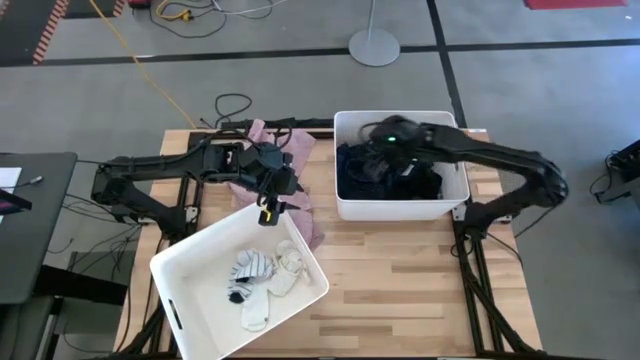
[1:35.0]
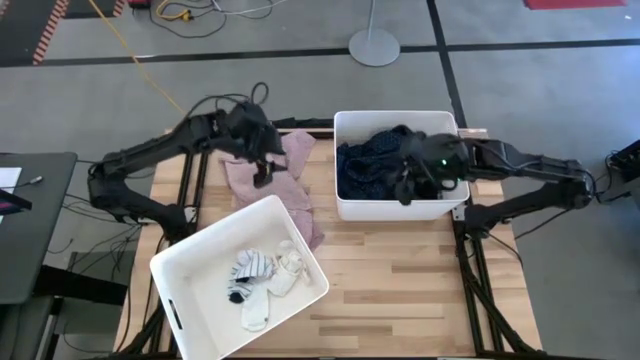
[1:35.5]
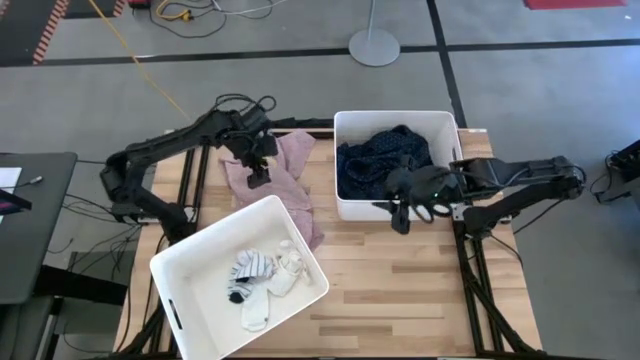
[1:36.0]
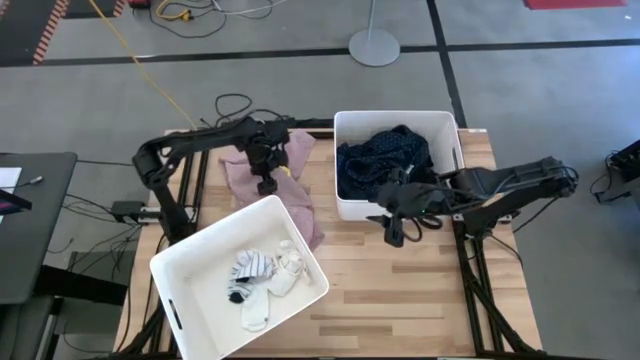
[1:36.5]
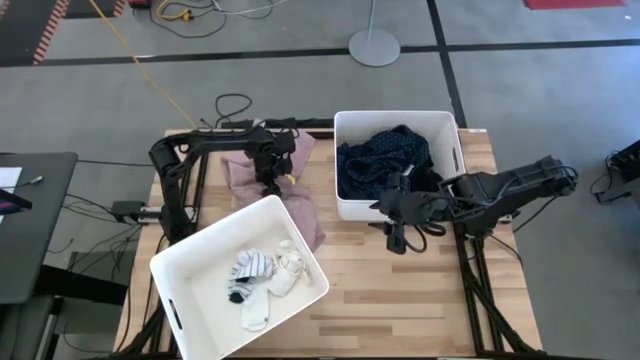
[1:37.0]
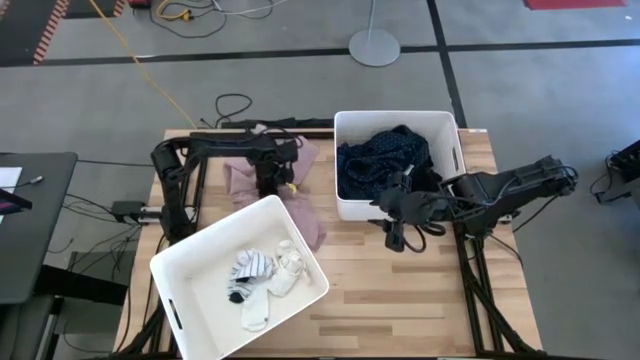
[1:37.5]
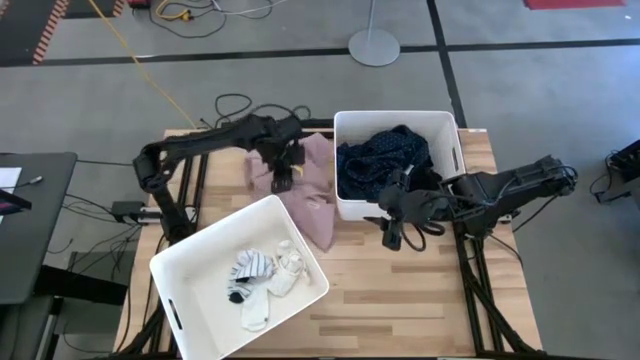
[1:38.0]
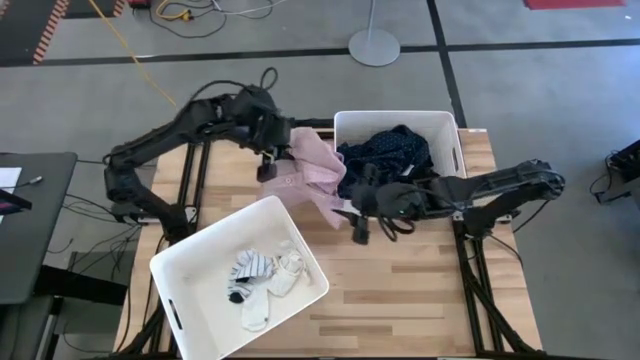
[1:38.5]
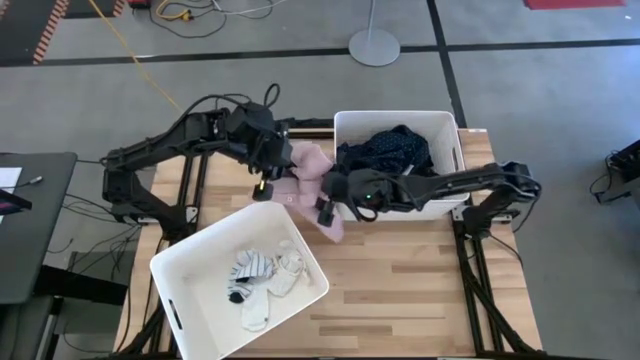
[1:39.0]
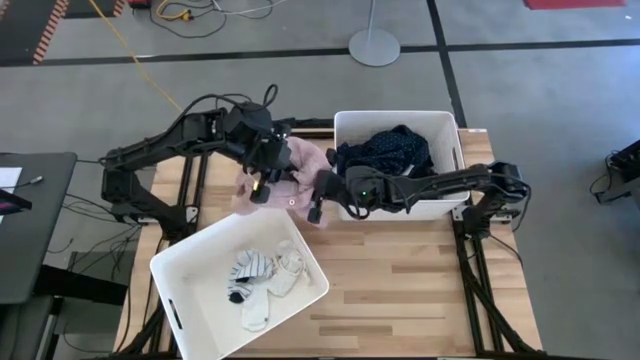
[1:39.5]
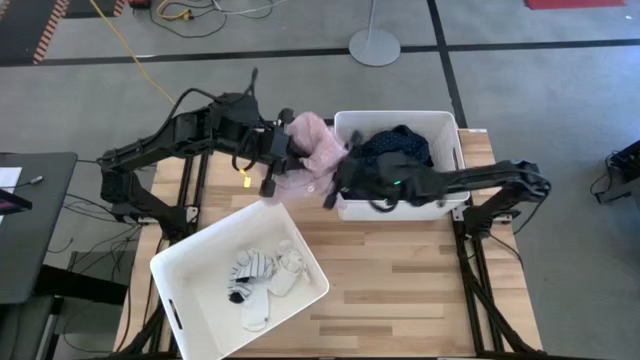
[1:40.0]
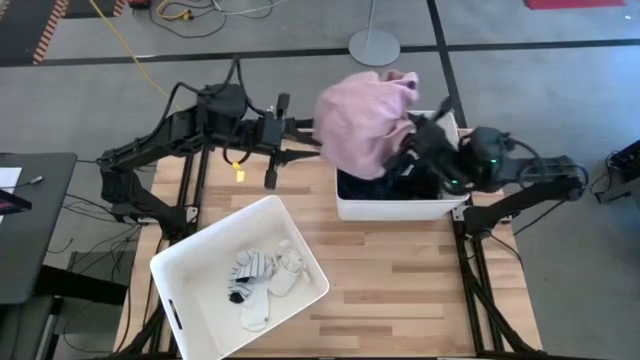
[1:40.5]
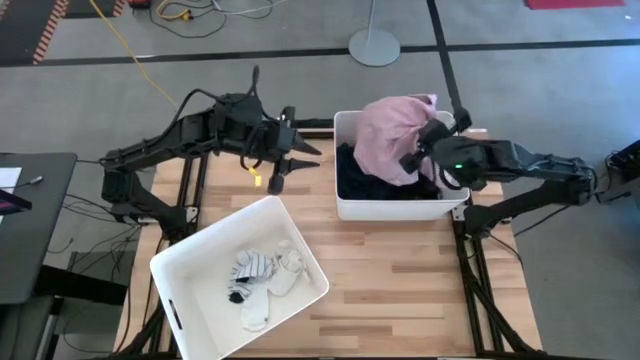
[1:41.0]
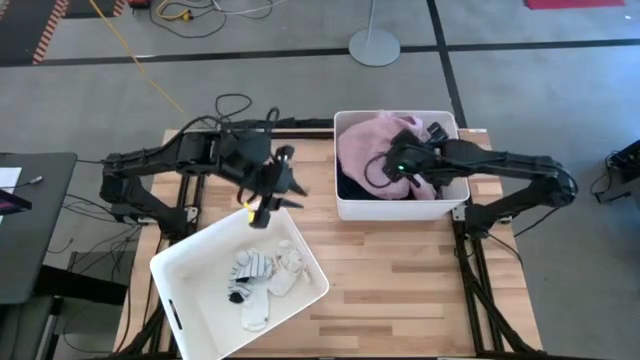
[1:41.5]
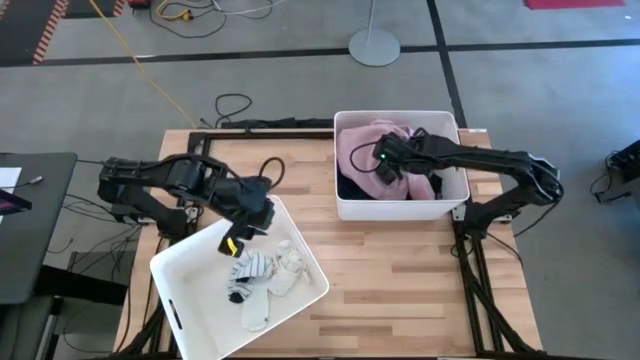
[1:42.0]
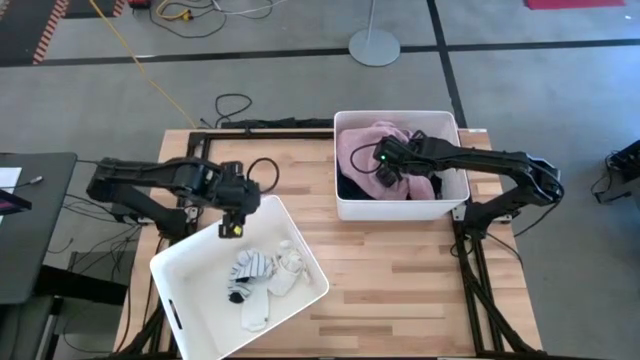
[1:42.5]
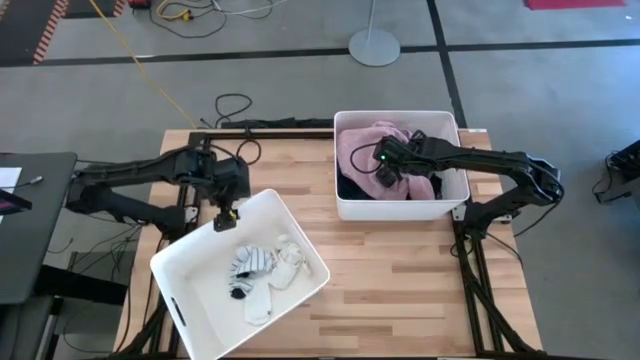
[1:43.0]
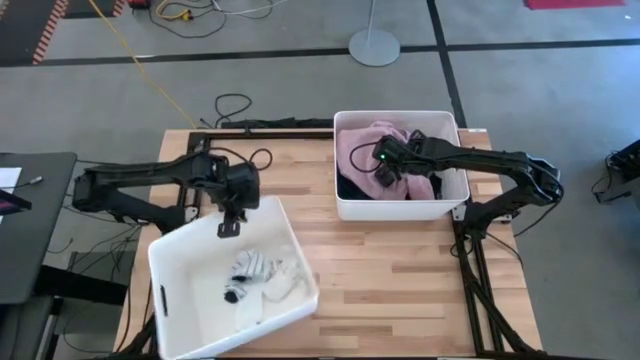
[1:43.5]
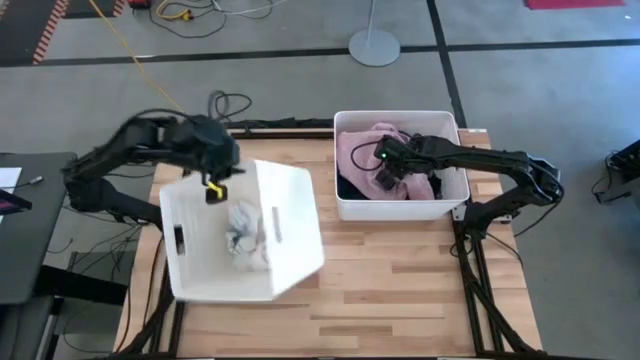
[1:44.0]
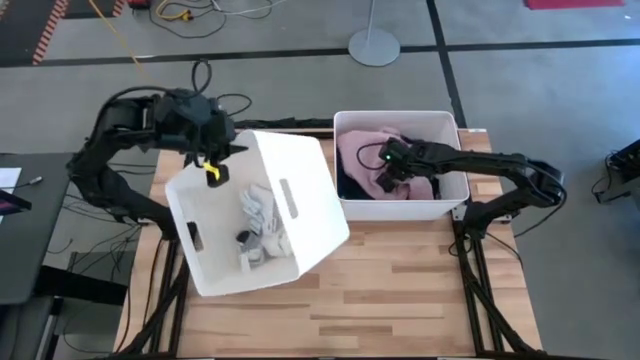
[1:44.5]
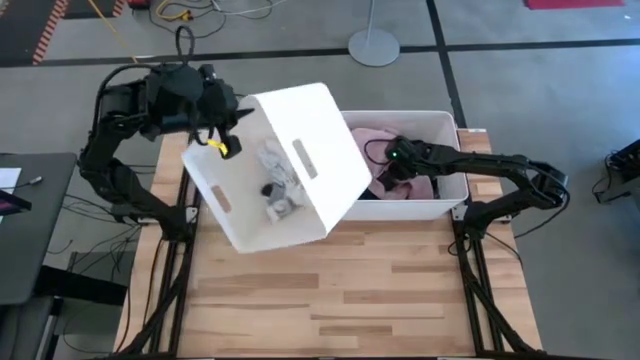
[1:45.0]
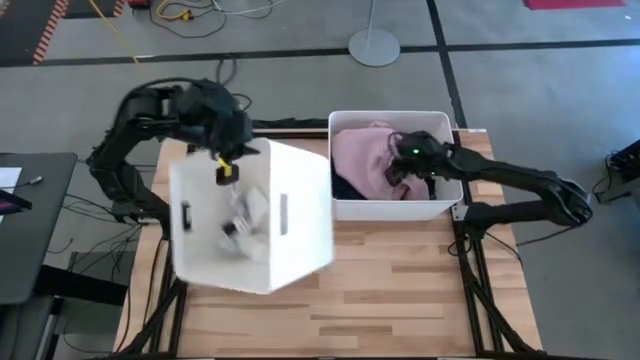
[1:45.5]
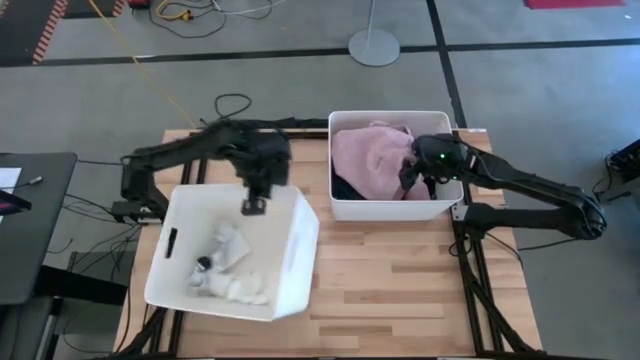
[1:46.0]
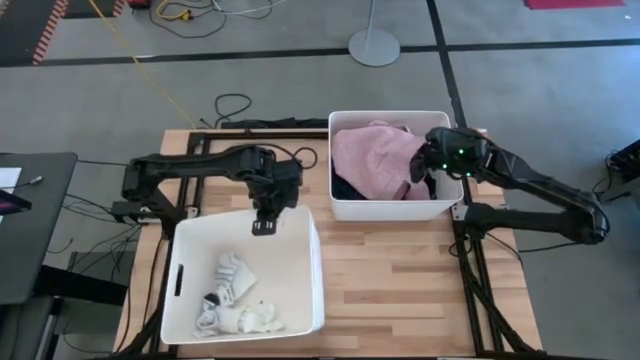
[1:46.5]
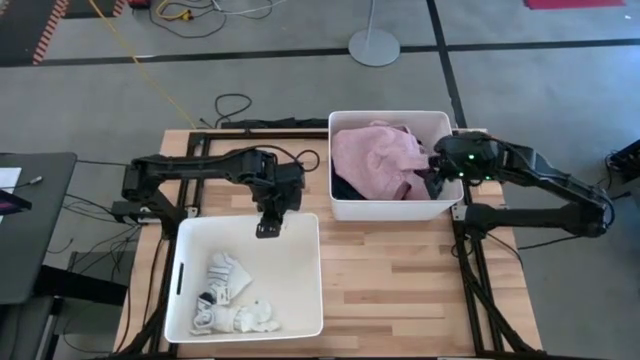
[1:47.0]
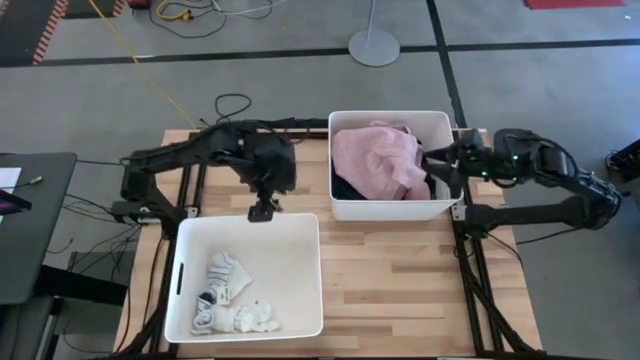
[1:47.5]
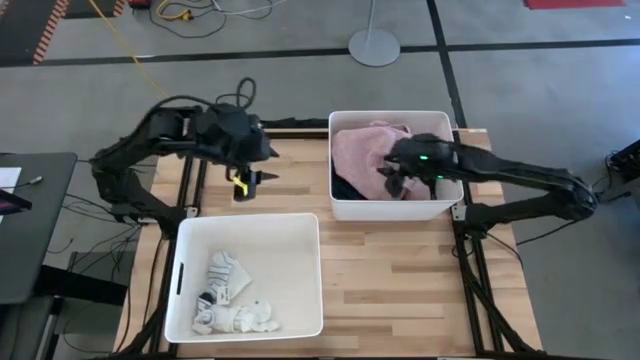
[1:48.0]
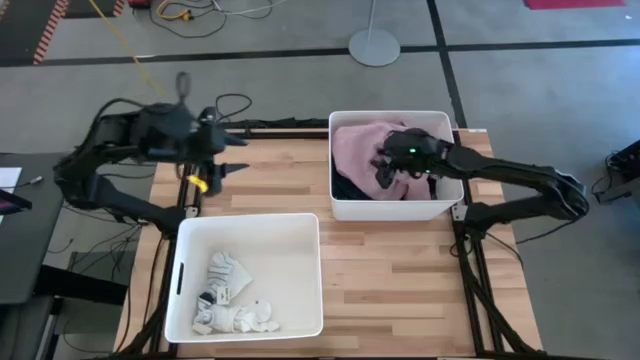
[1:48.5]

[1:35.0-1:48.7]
Task: Sort clothes
Put the pink long sleeve polo into the top laundry bin

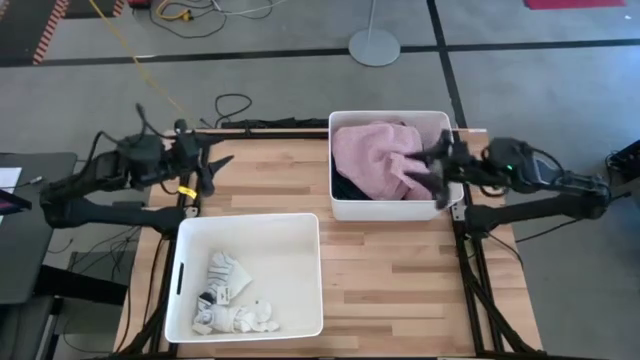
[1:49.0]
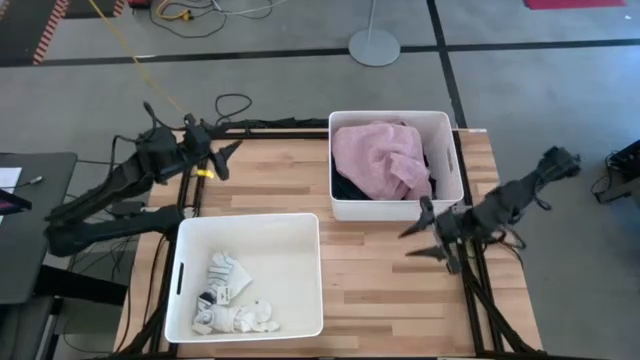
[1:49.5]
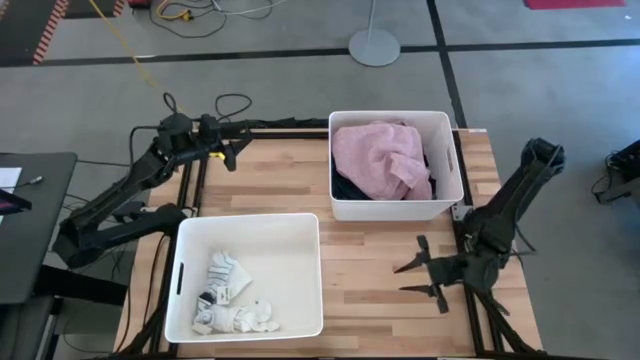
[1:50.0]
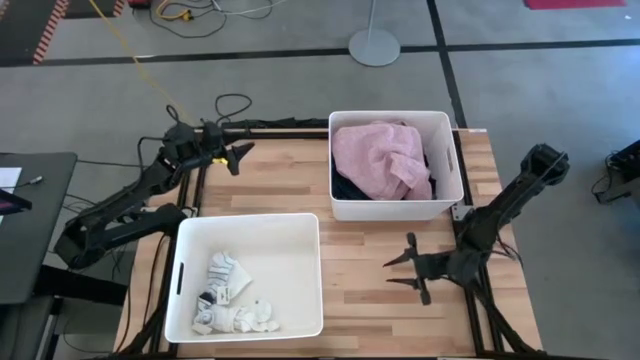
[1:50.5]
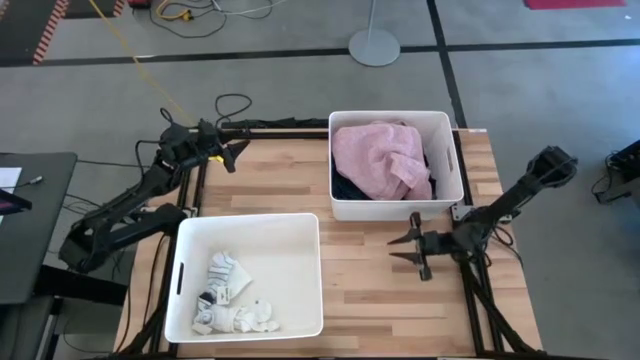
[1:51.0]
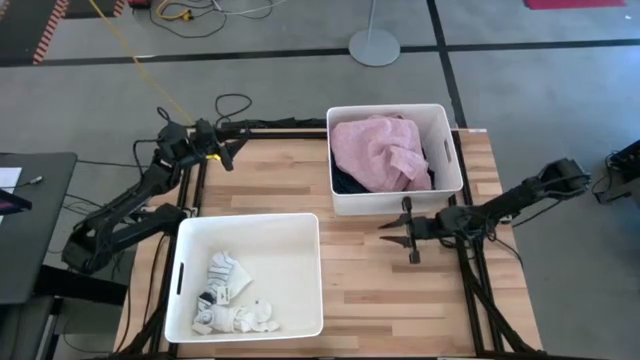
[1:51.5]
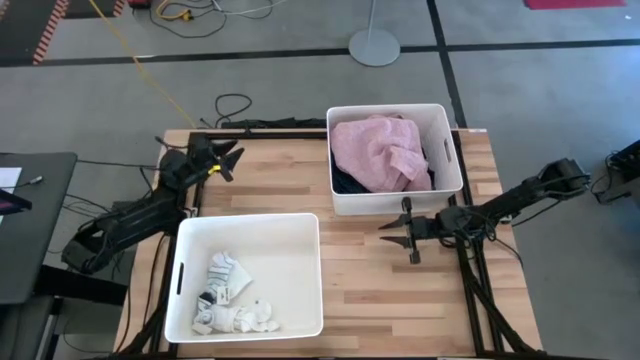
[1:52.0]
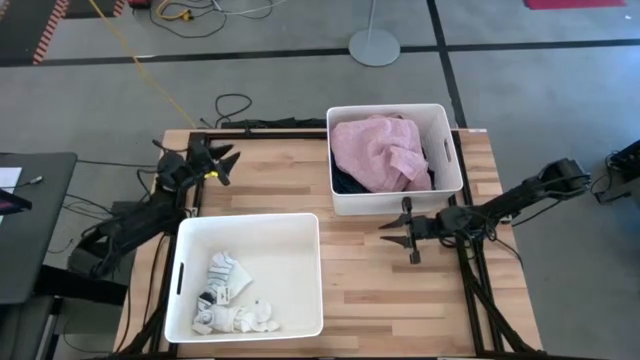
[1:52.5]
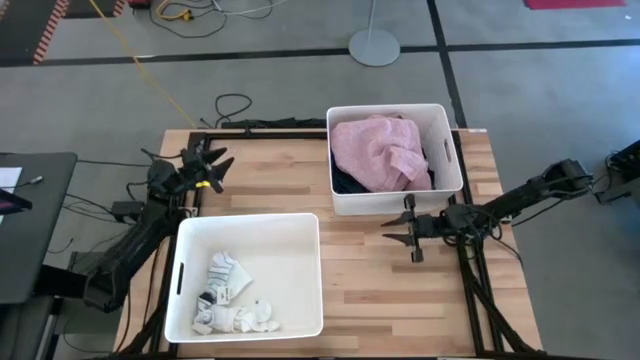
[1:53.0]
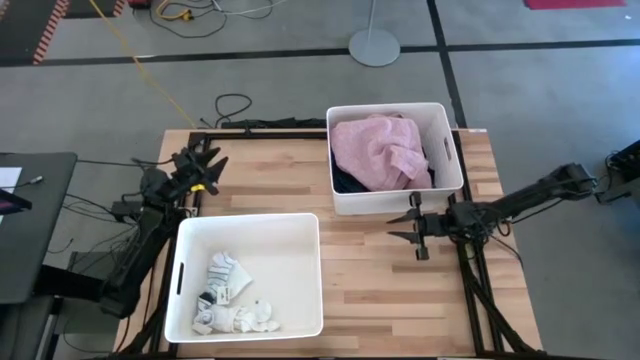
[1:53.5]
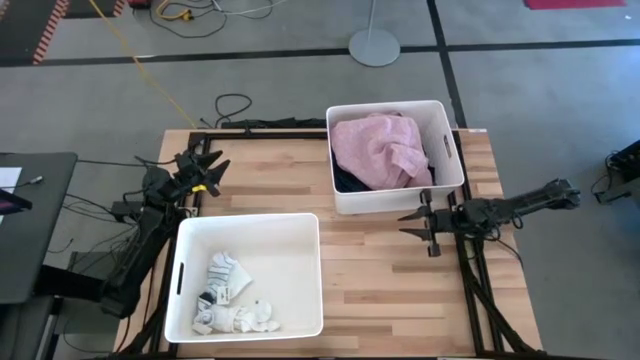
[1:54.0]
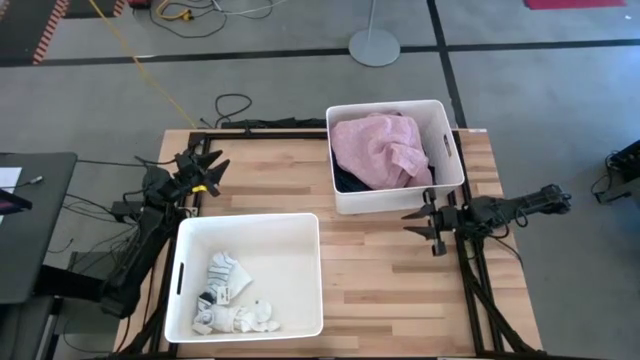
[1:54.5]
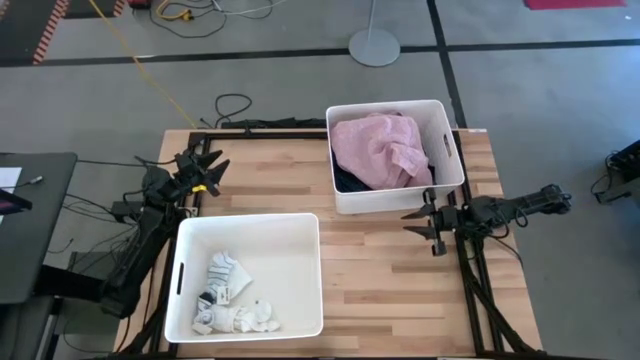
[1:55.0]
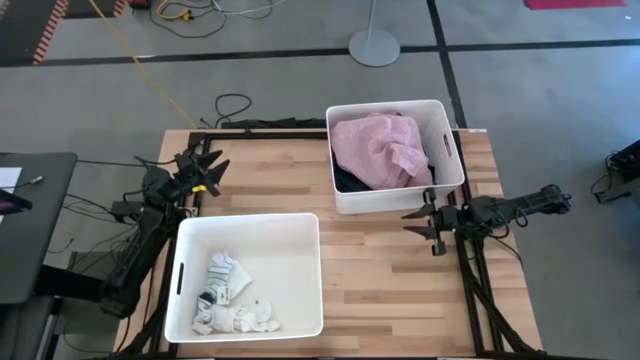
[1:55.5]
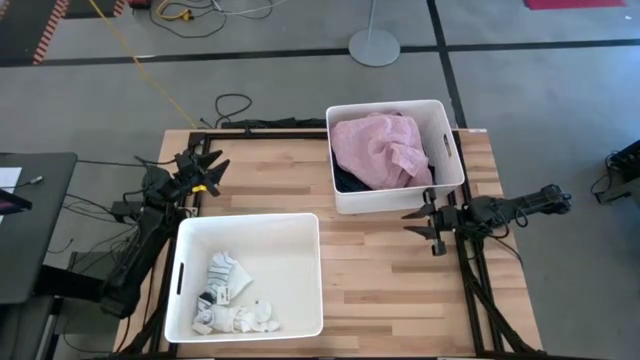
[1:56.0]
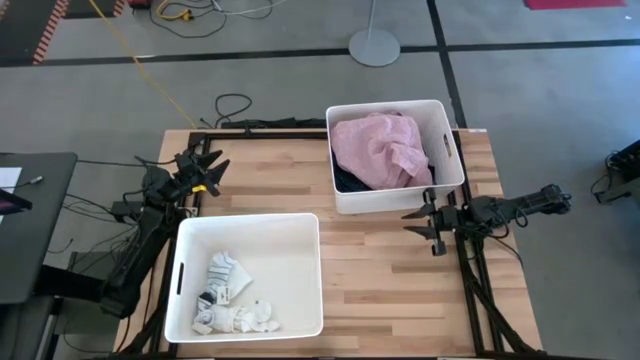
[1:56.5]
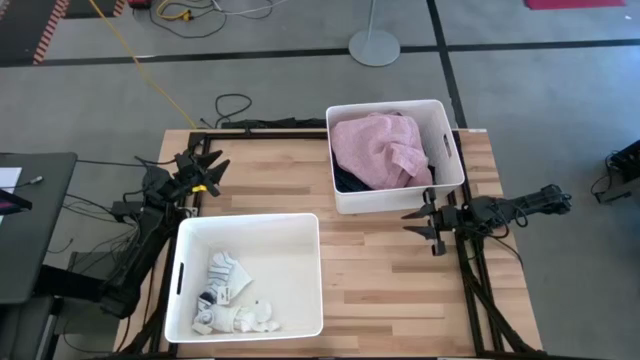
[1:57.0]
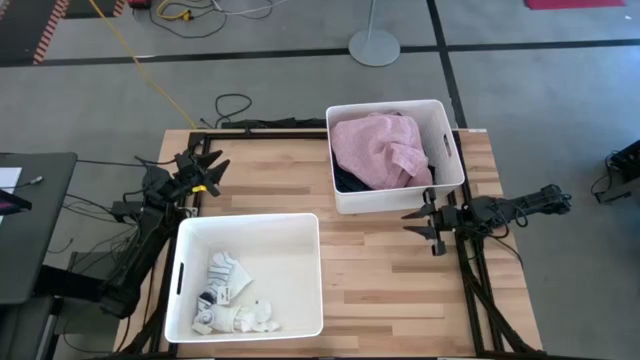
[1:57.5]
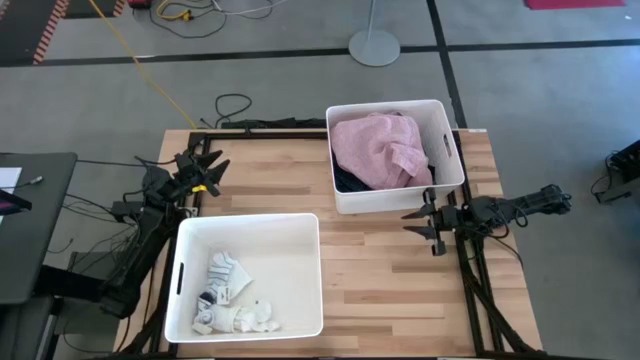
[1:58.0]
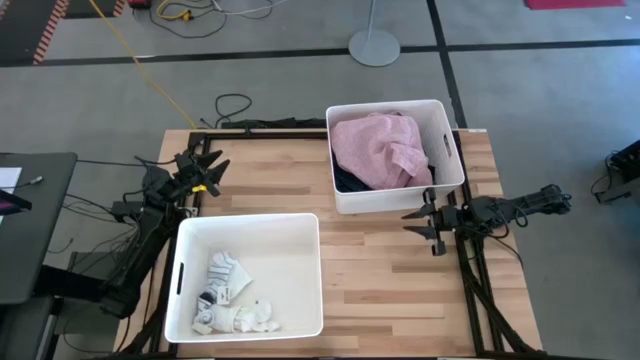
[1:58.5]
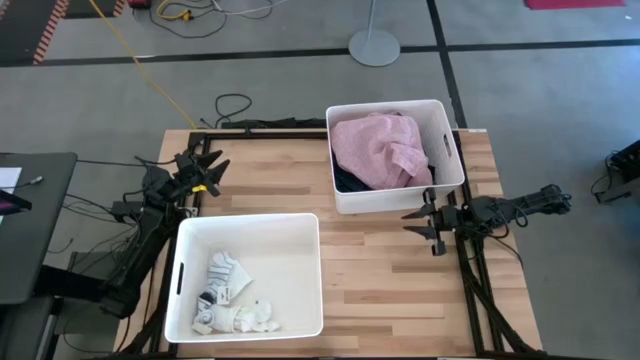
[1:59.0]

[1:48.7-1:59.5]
Return to Home Position
